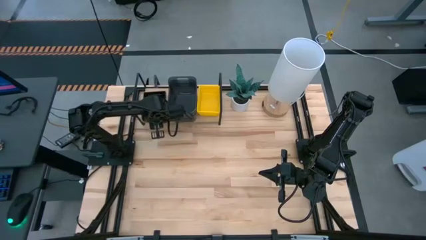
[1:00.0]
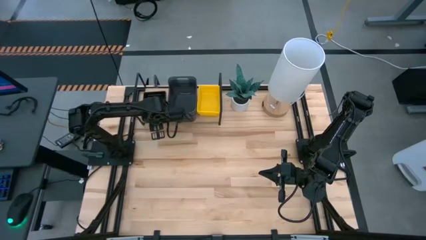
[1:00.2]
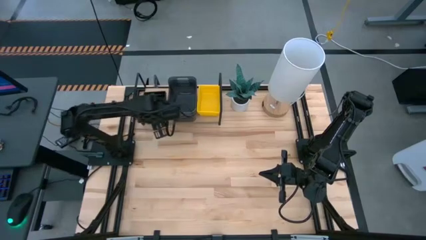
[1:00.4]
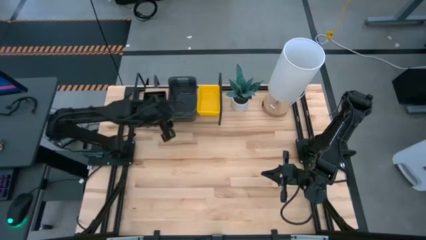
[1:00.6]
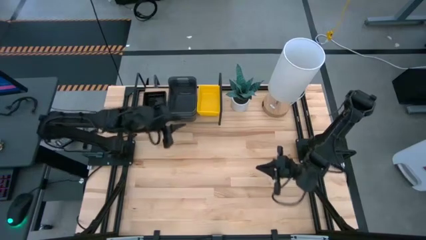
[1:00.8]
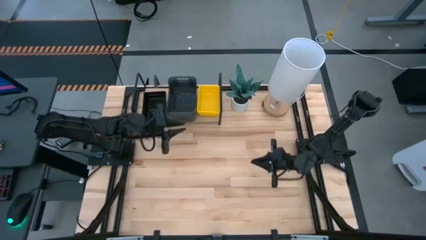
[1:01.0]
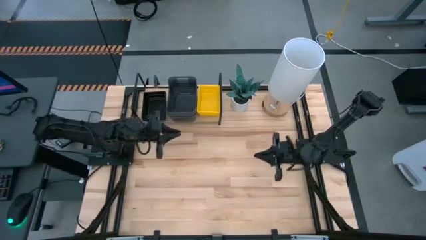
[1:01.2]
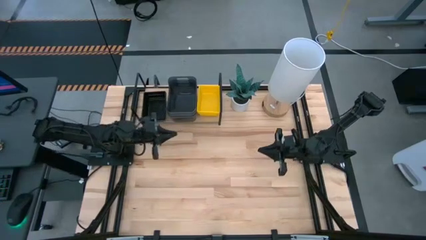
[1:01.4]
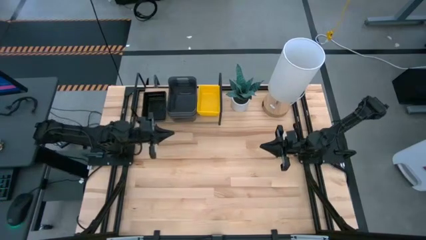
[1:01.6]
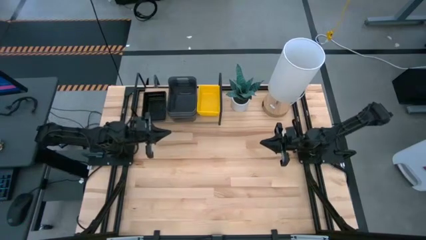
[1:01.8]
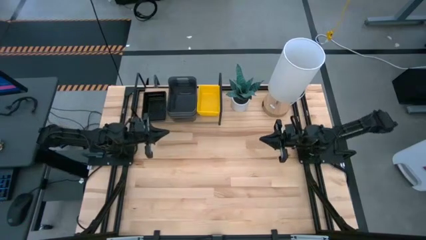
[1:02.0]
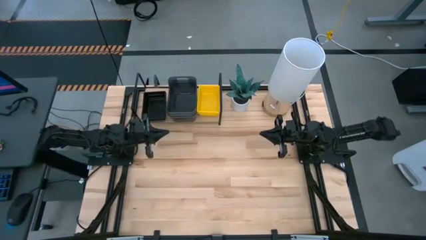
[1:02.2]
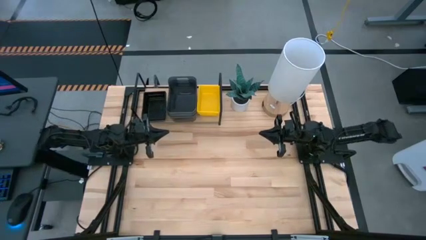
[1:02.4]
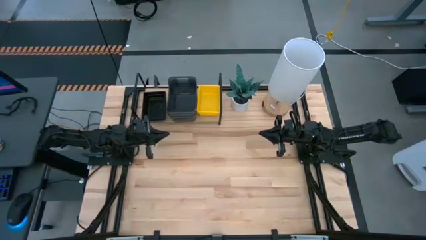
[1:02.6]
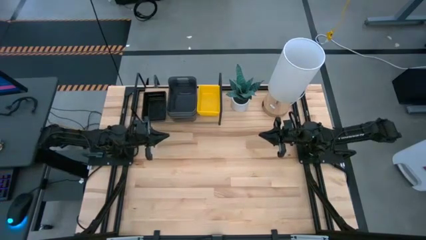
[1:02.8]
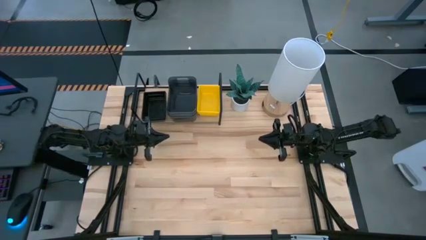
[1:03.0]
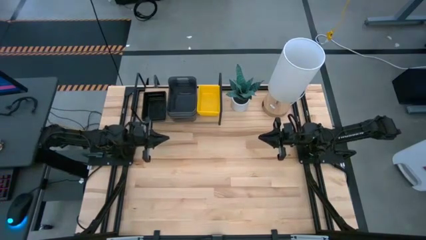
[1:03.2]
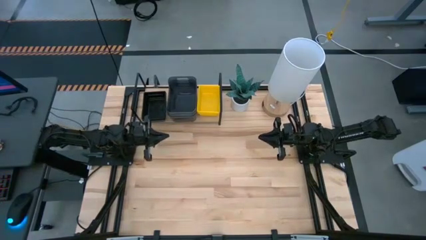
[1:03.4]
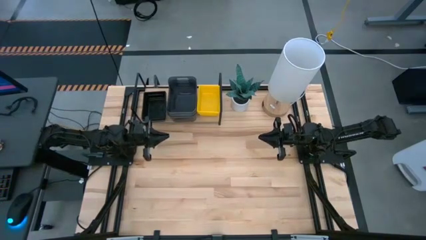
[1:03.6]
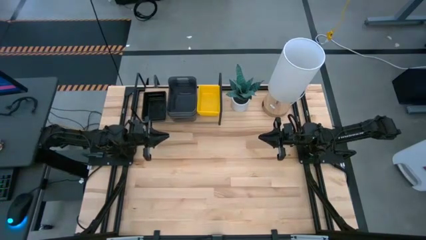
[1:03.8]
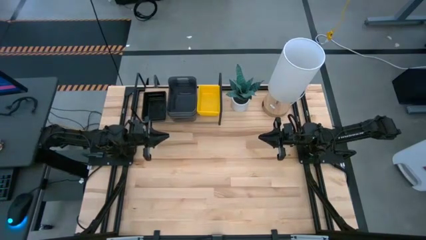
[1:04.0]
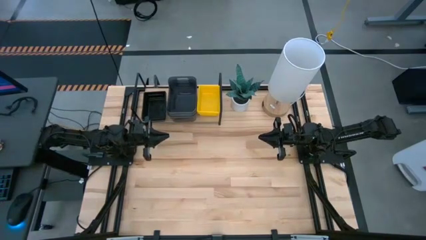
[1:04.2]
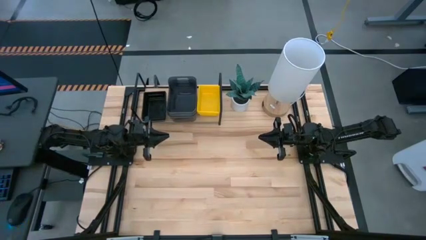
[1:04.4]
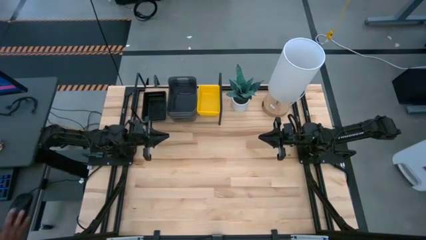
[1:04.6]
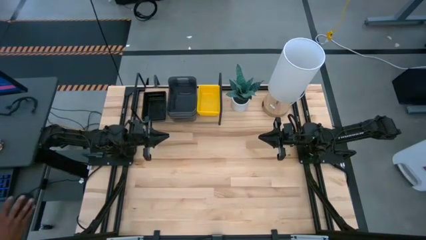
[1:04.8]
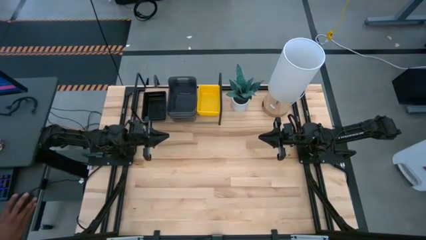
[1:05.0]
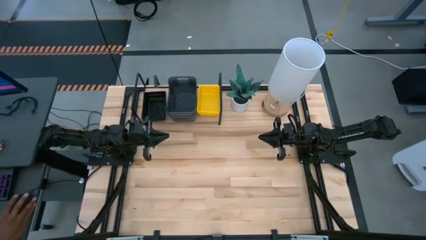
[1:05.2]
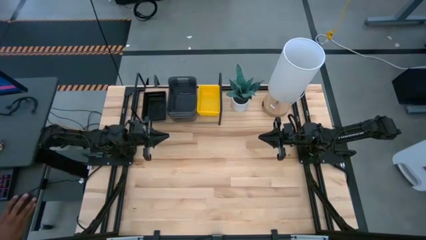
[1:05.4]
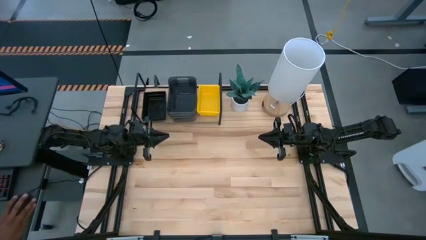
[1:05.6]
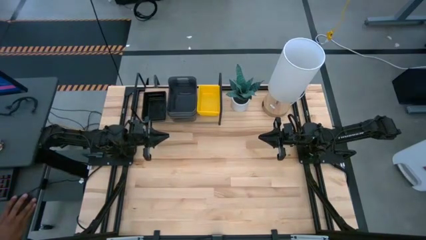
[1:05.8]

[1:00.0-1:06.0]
Task: Stack baskets on shelf by color
Return to Home Position

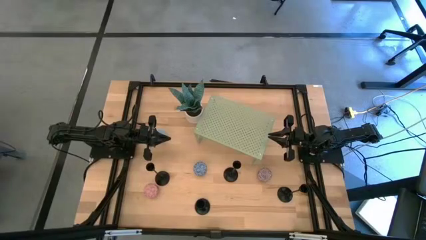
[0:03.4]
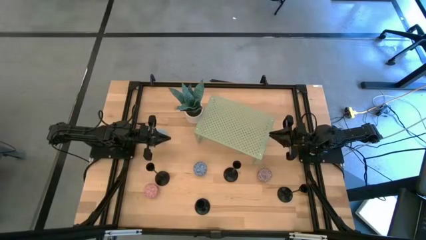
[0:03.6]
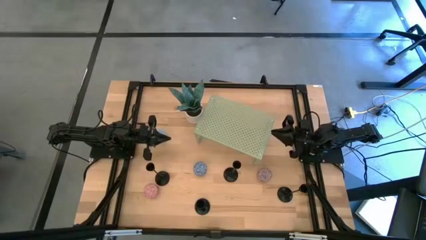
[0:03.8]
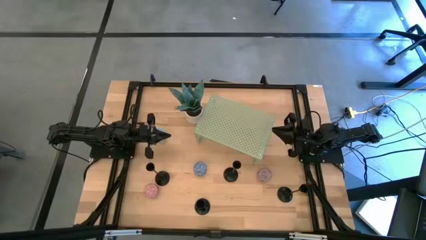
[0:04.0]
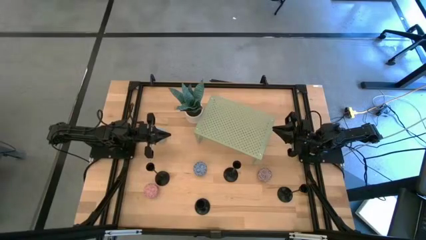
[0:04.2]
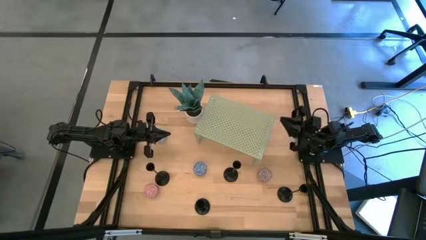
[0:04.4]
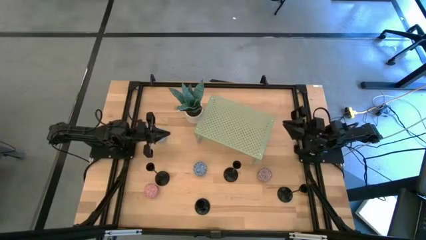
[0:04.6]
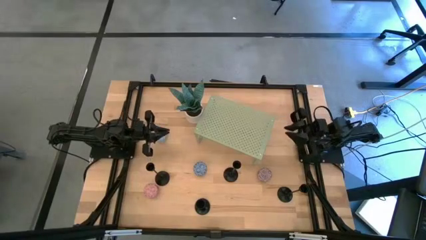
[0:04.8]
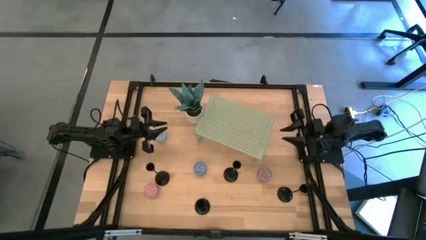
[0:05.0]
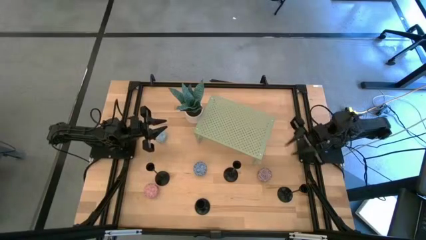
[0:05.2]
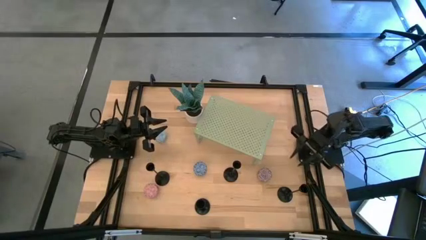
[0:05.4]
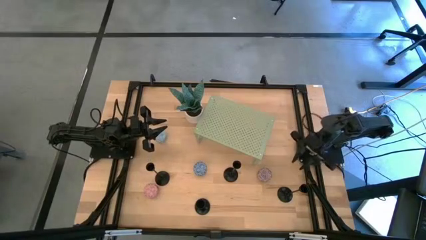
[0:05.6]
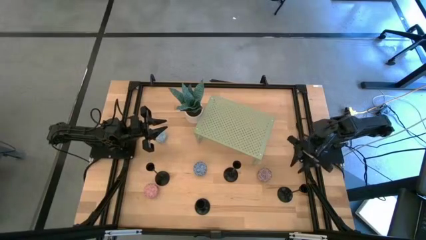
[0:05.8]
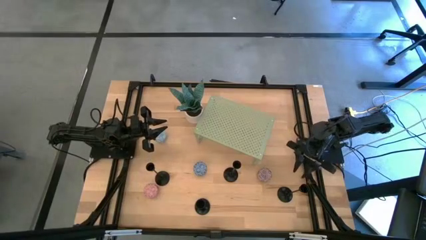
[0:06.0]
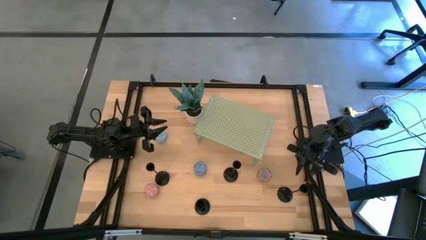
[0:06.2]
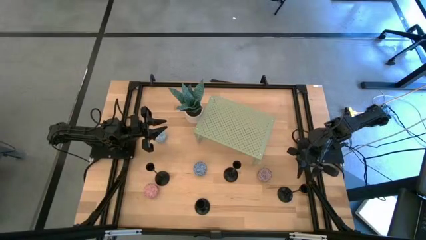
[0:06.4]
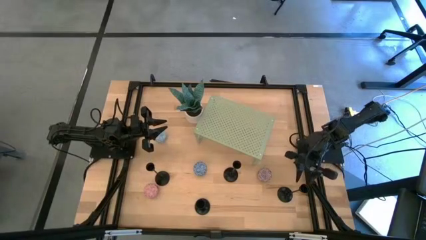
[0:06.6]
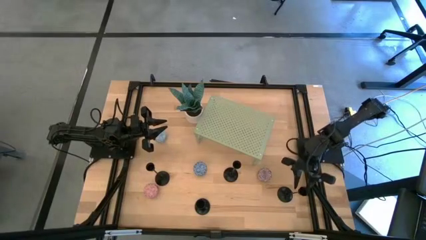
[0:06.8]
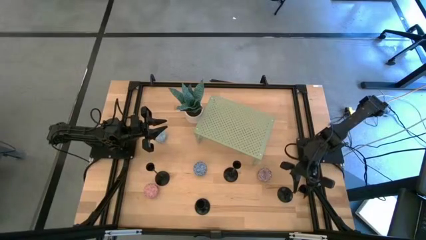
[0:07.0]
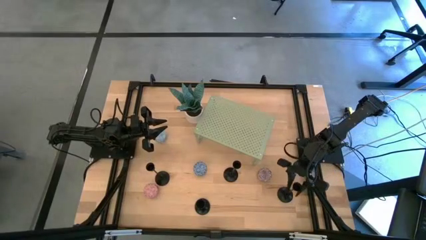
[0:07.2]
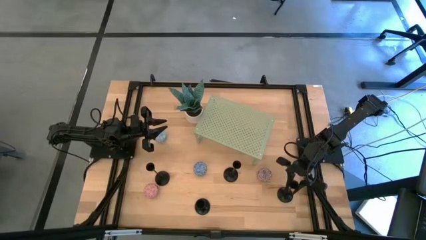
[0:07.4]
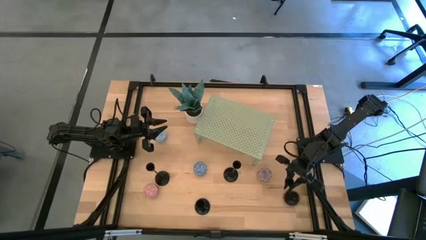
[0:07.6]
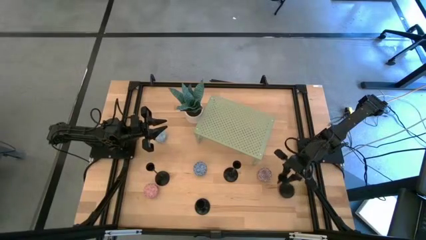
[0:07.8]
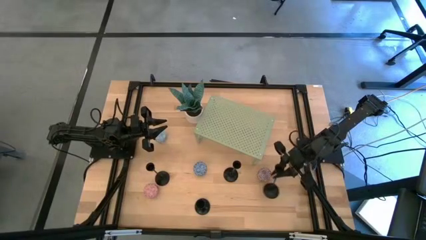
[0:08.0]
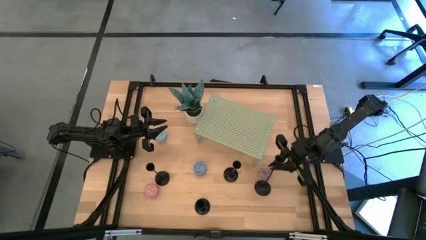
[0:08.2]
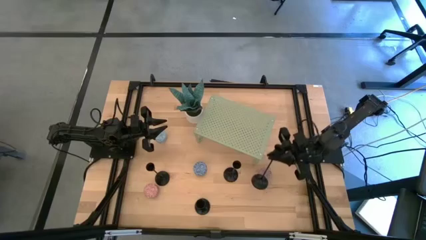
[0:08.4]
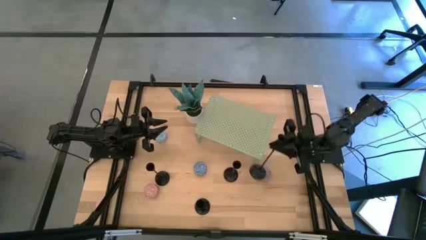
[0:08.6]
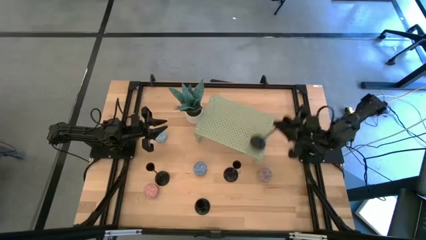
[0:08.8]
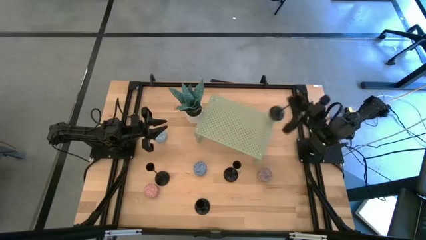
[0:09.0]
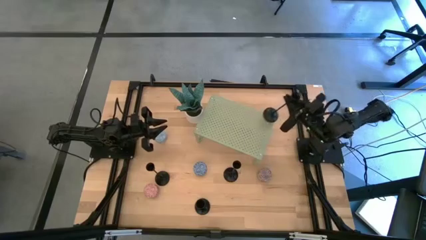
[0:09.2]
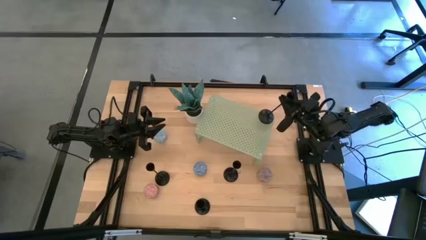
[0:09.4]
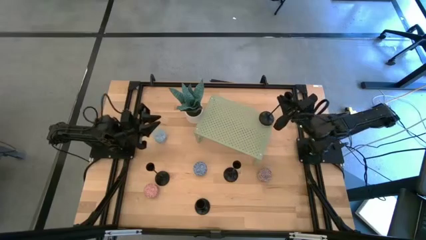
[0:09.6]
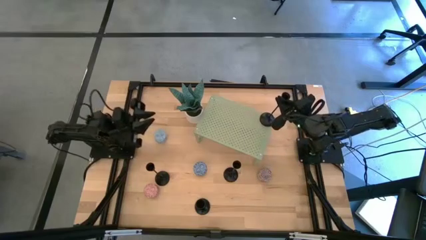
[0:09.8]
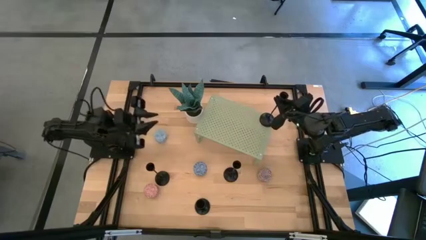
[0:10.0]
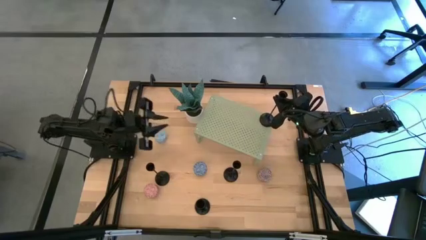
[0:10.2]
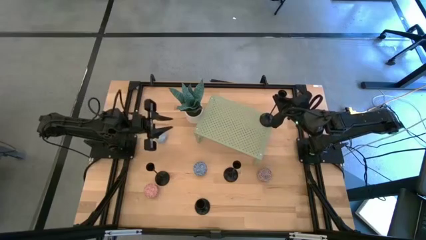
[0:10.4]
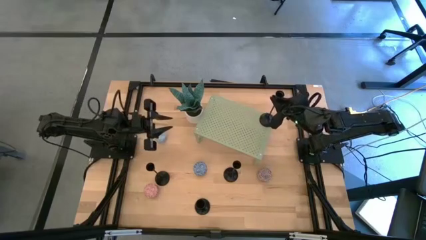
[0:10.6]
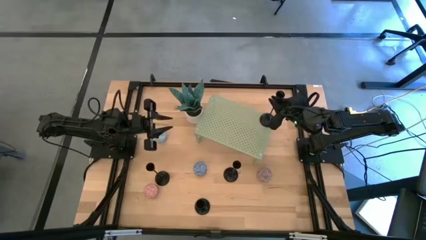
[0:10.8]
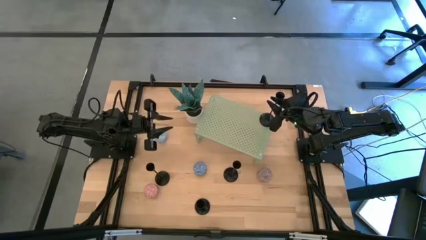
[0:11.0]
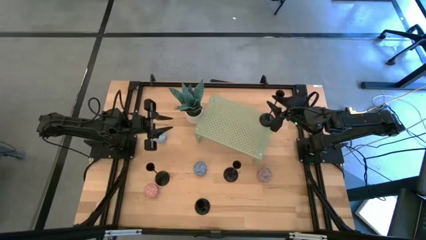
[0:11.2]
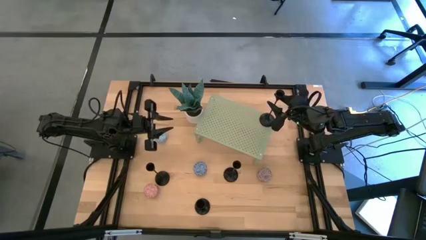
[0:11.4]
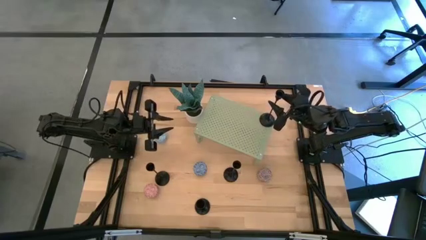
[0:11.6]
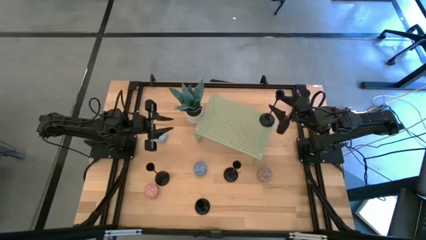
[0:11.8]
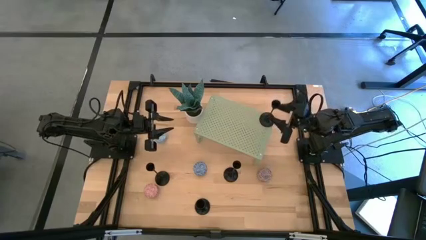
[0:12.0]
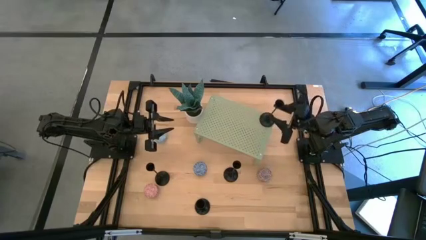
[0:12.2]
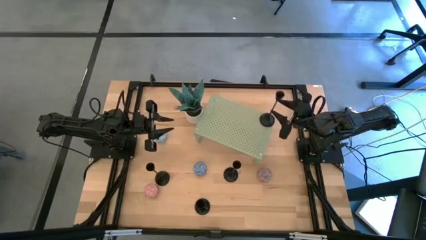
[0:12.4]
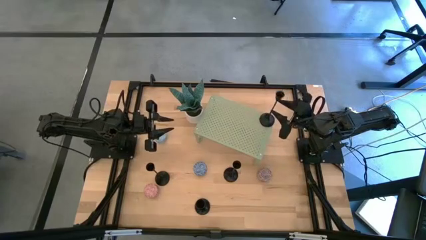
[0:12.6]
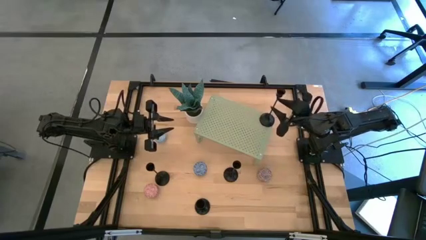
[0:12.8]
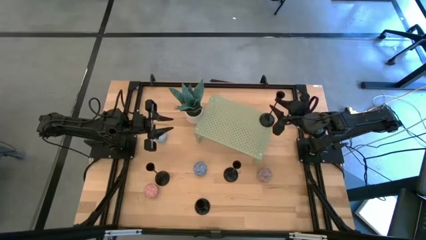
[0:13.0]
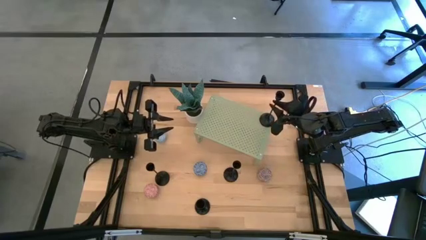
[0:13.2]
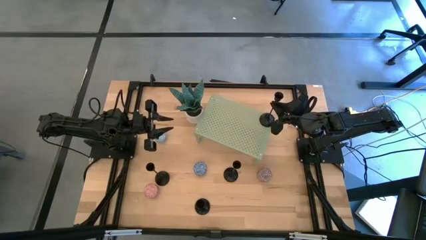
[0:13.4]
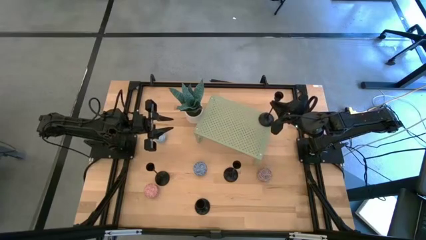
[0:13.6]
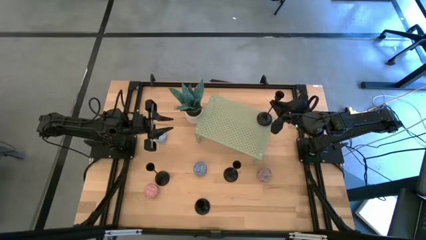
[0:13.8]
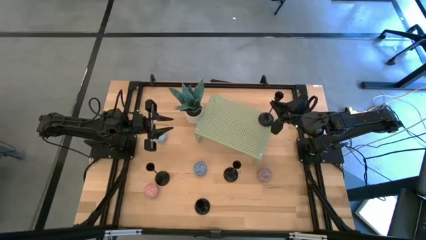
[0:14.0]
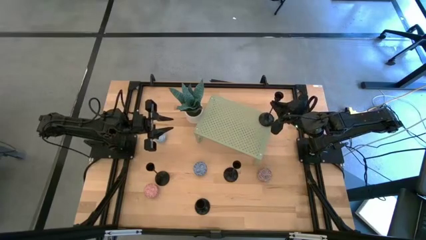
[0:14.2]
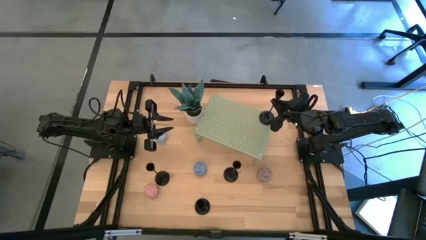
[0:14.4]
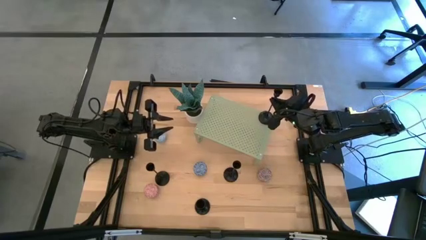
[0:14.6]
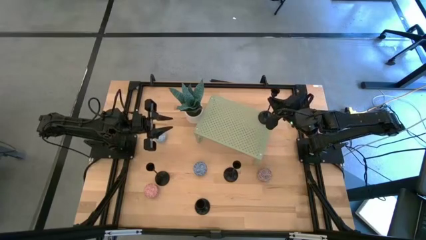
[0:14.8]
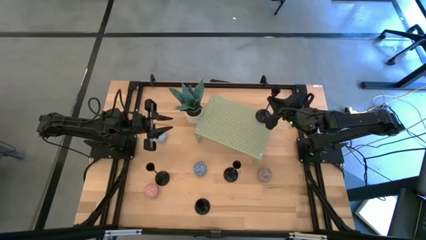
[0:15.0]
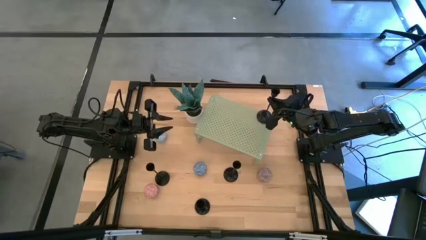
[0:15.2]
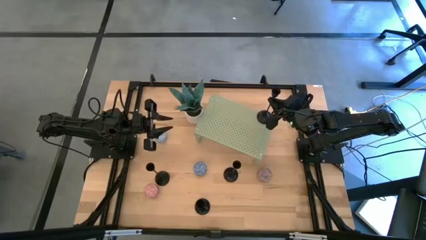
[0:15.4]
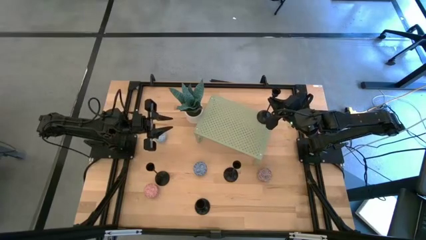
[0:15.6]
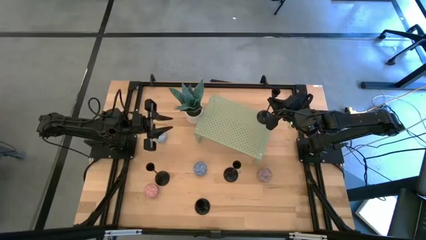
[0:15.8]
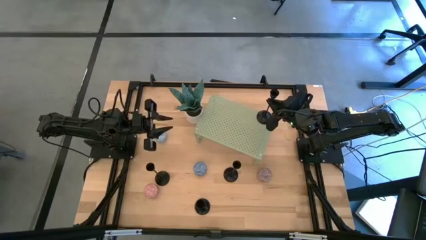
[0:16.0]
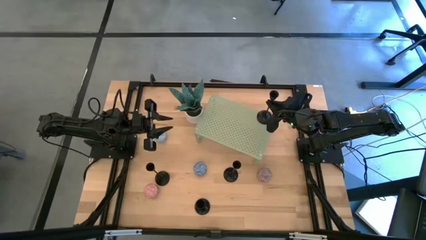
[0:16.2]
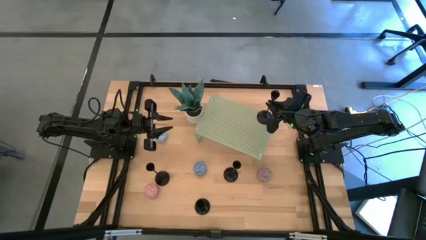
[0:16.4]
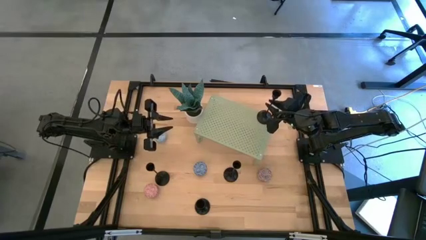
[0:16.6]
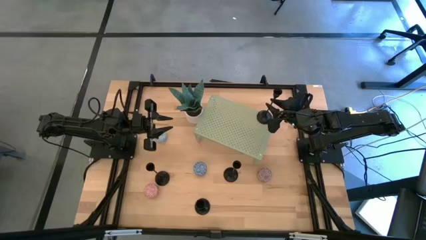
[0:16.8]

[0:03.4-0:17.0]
Task: Stock candles and holders on shelf
Put the black candle holder on the shelf
